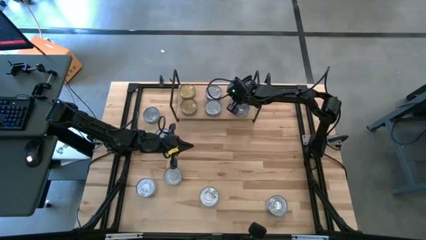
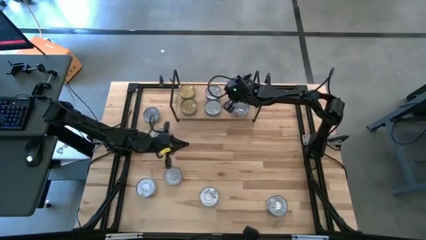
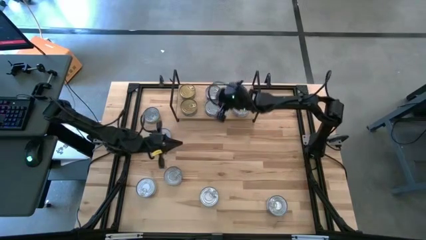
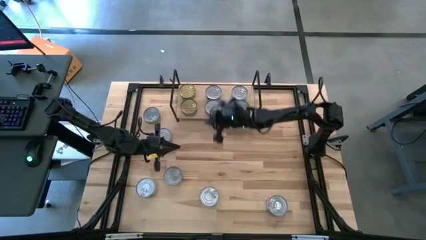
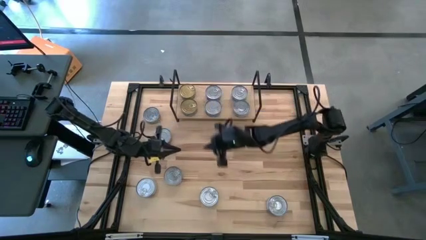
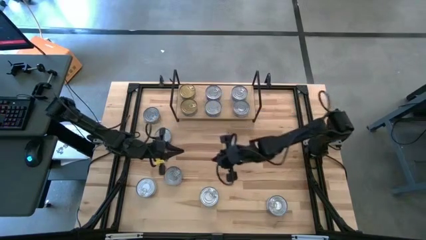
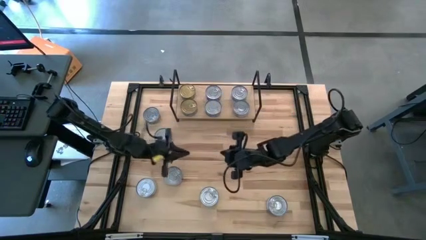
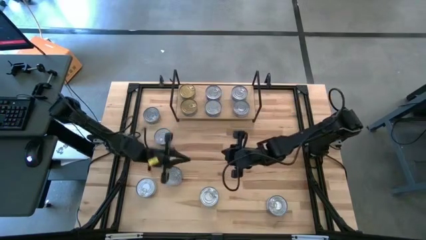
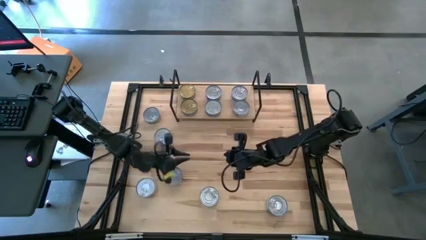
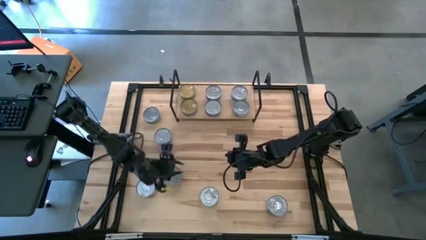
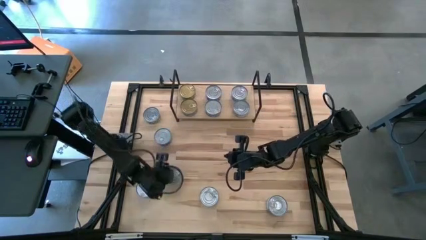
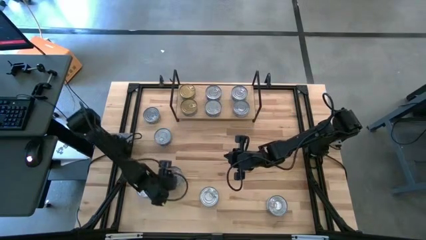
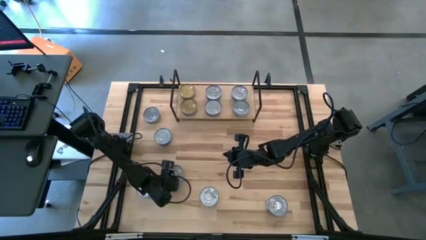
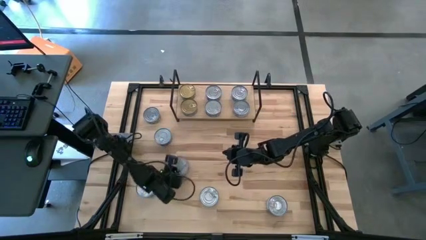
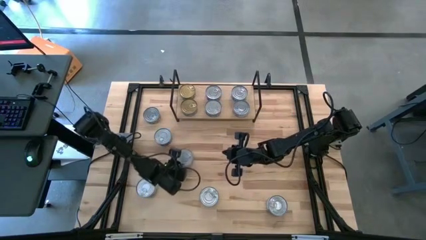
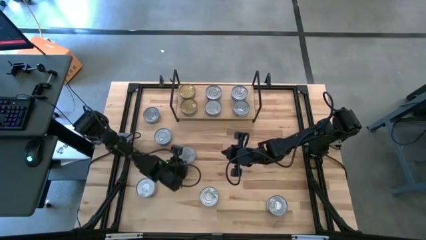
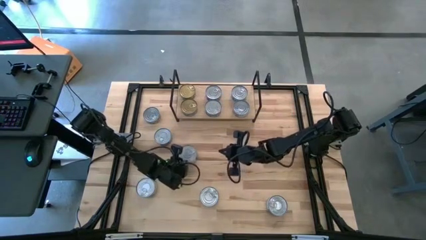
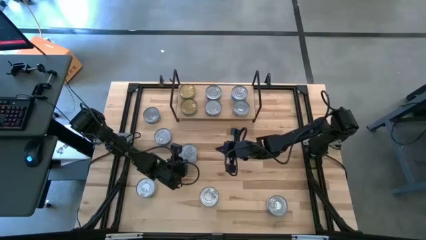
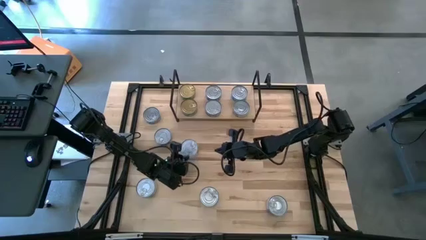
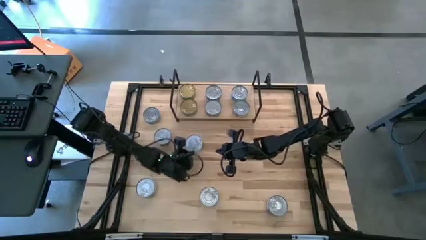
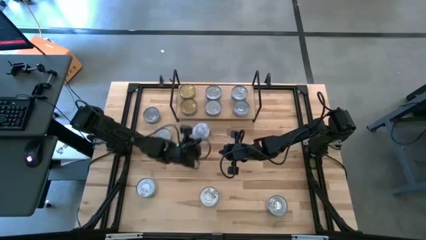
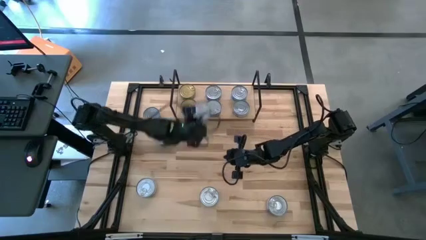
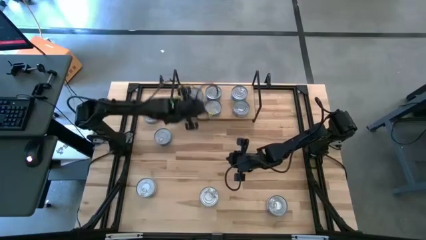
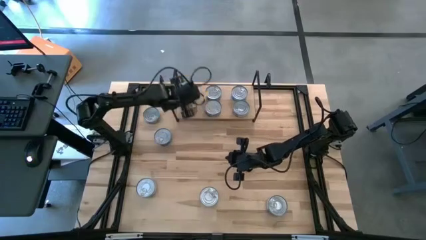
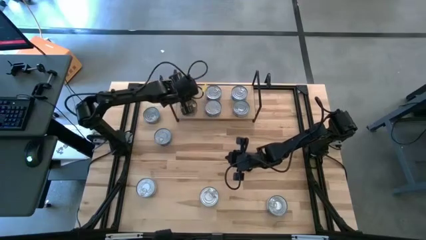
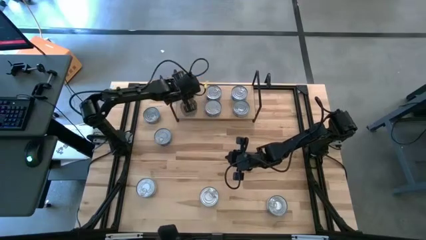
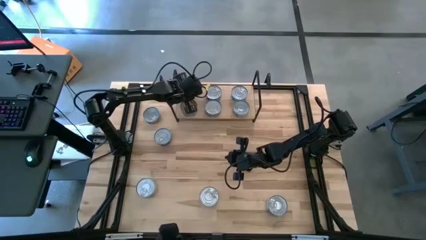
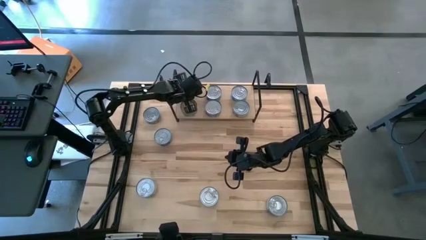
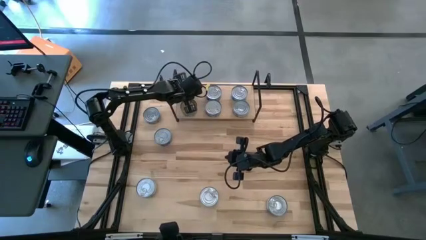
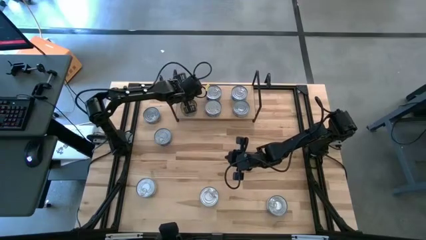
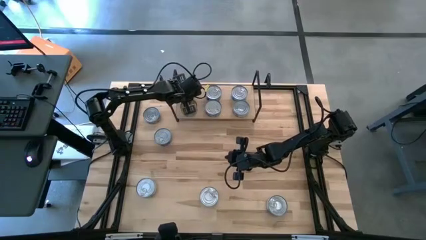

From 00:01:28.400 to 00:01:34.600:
Task: Stack canned seafood by type on shelf
Stack the green tuna can on top of the green tuna can on the shelf

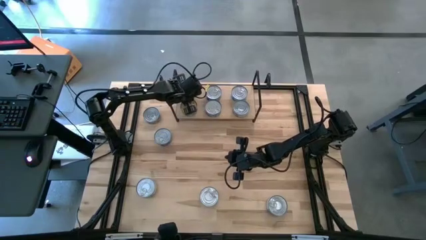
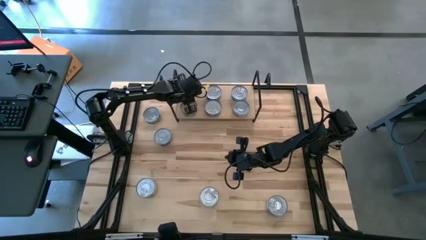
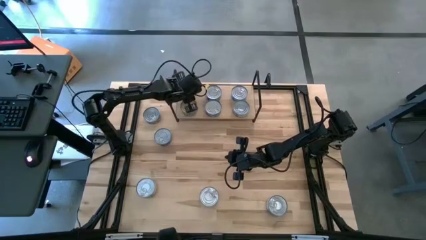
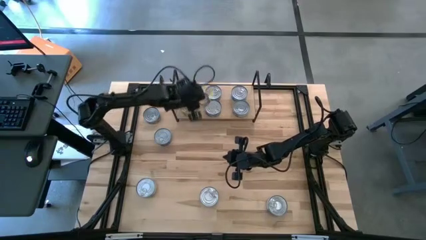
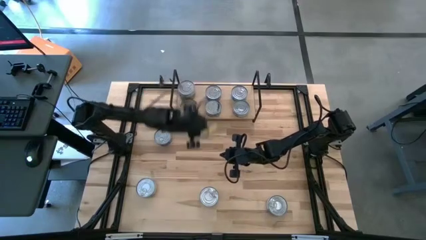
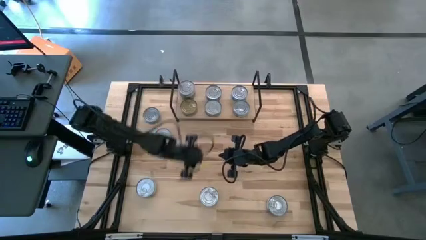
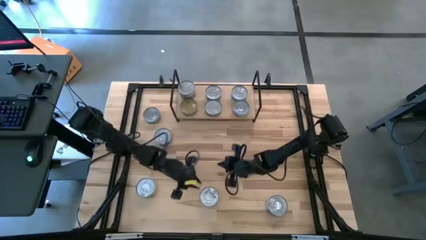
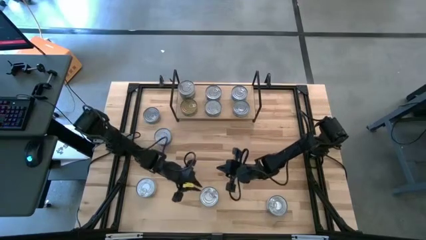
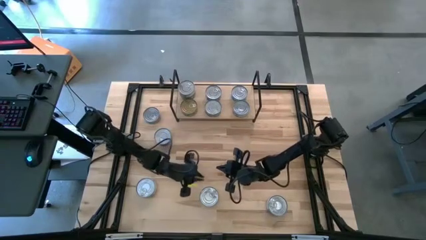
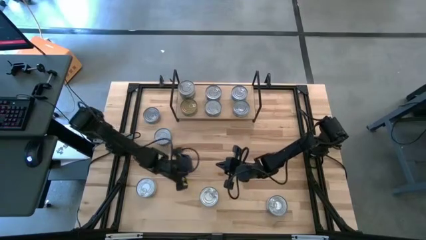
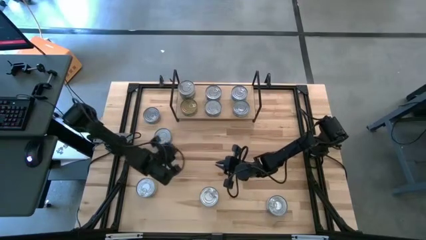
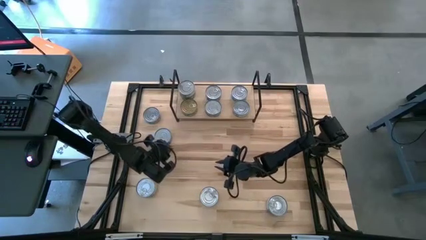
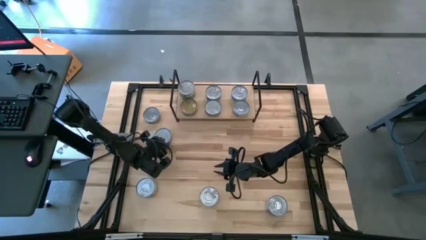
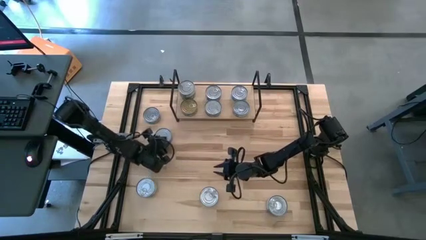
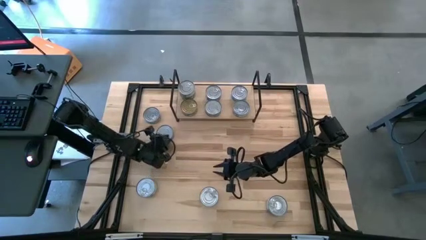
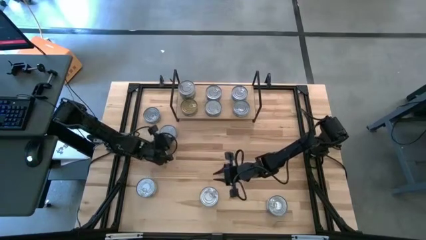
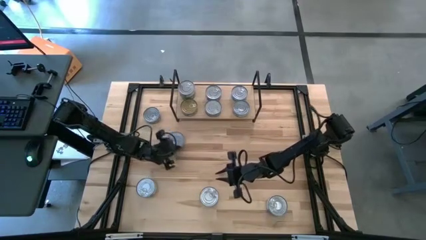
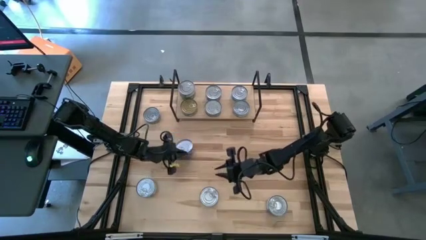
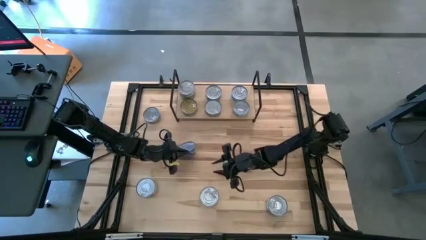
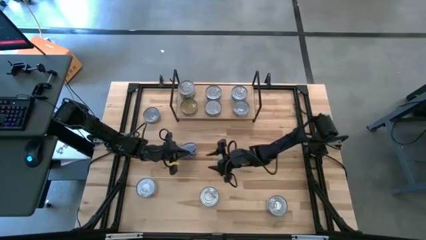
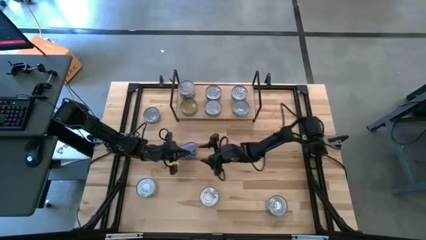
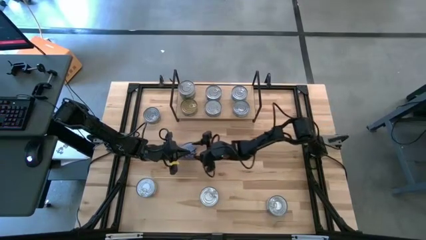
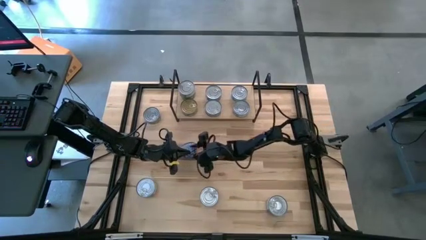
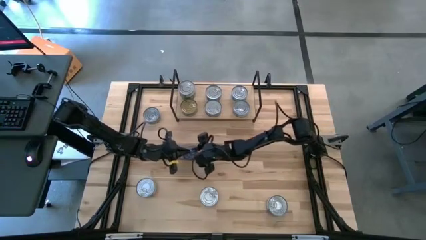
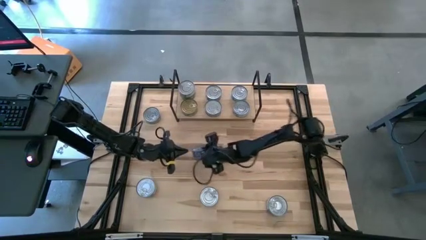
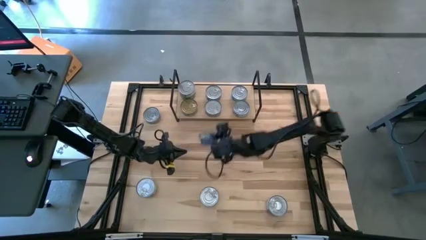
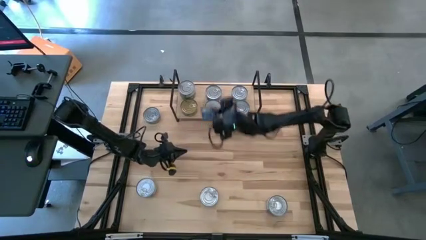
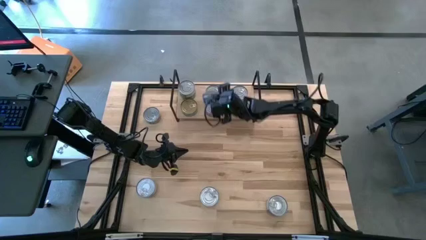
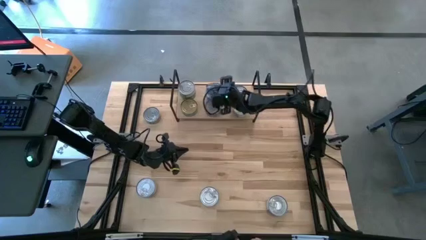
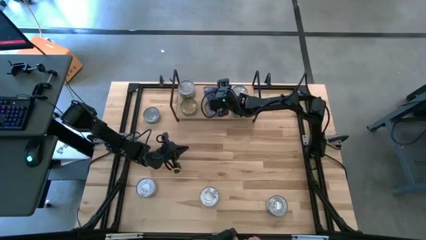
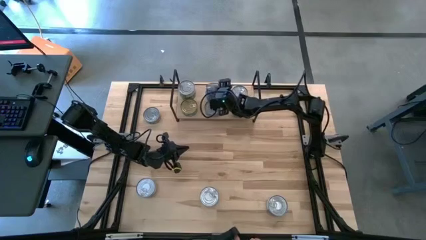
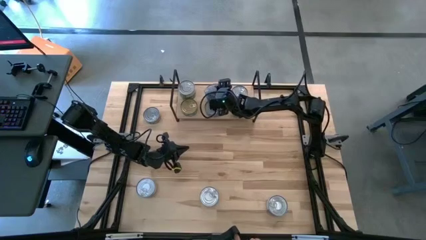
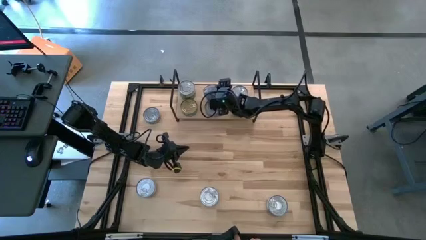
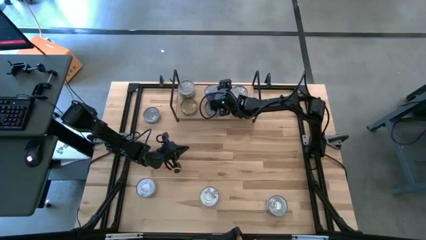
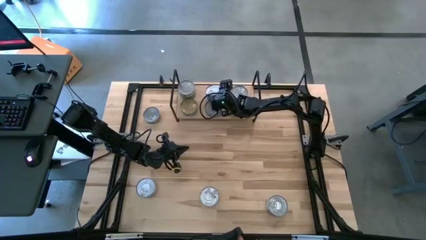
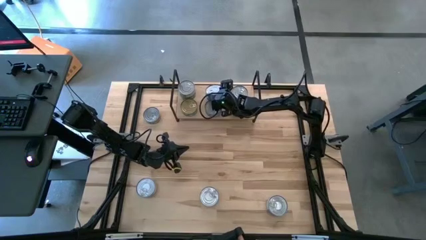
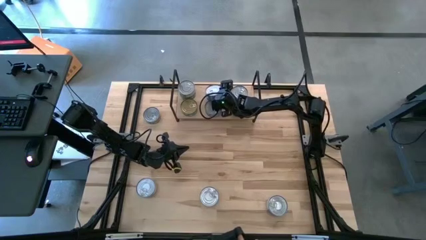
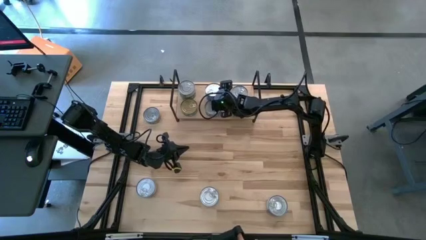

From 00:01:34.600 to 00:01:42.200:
Stack the blue tuna can on top of the blue tuna can on the shelf

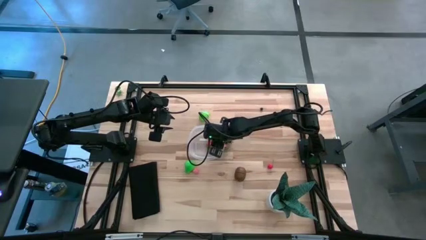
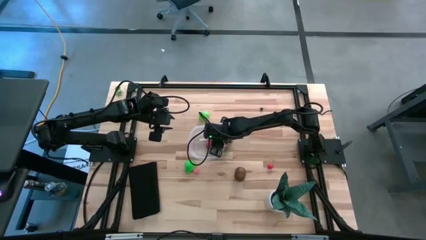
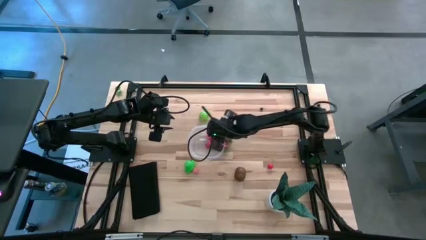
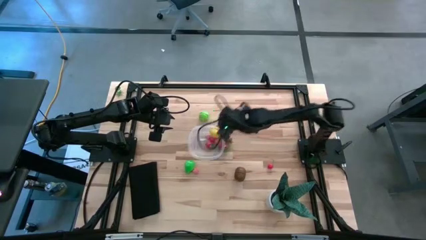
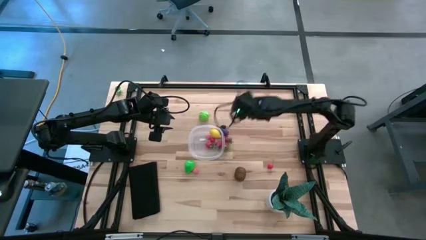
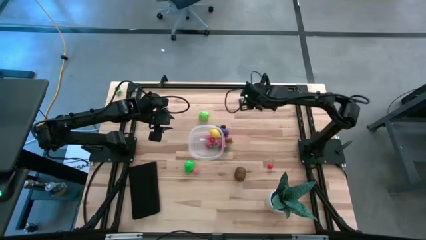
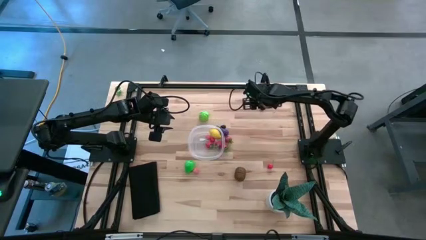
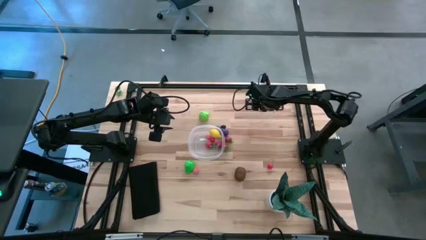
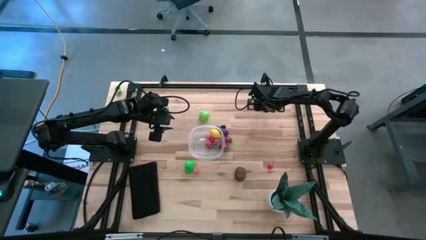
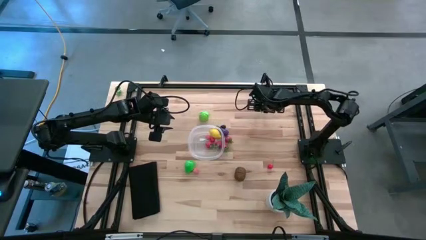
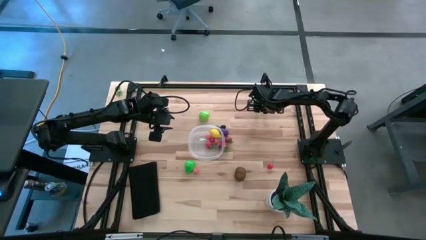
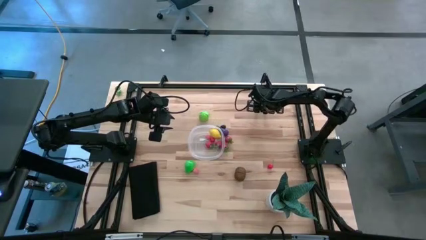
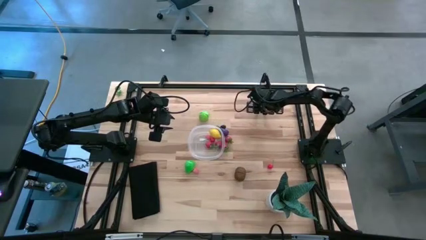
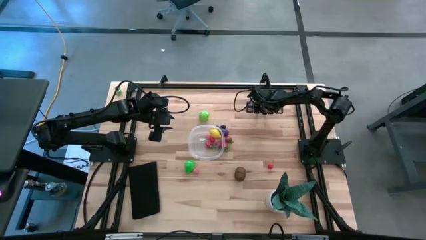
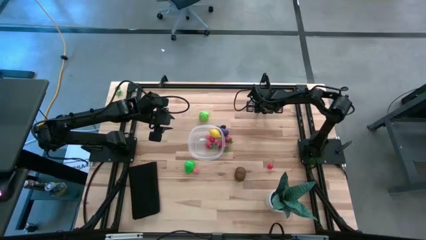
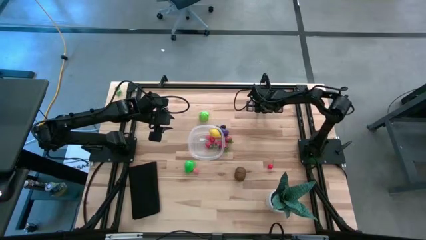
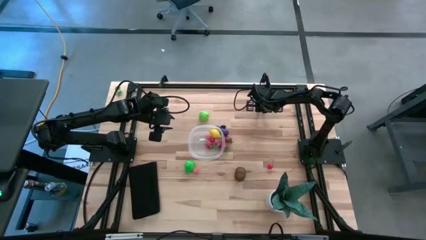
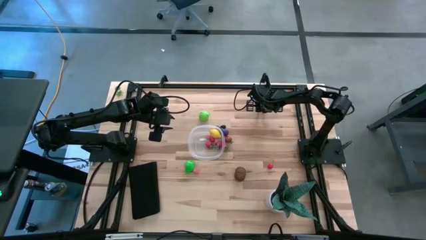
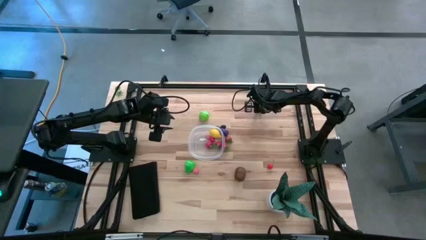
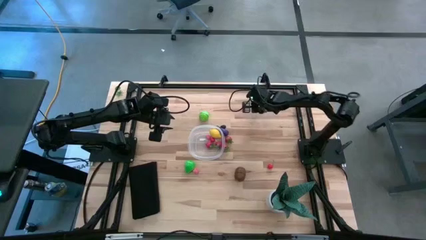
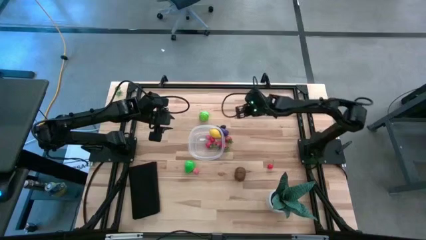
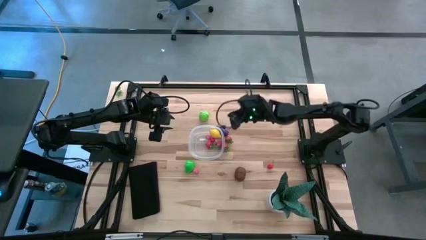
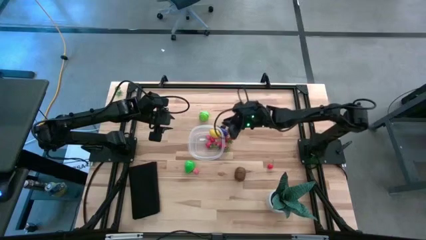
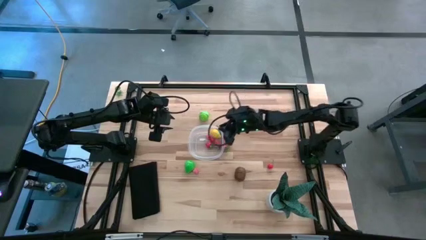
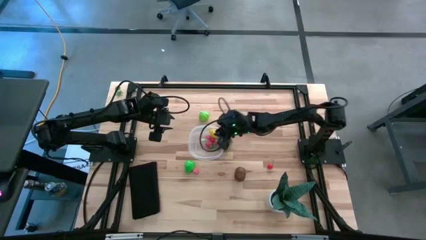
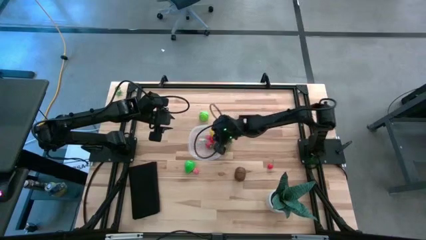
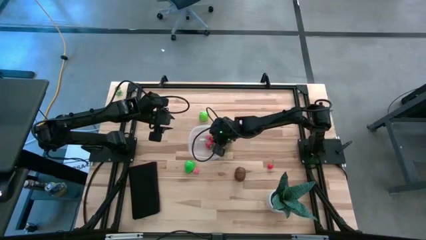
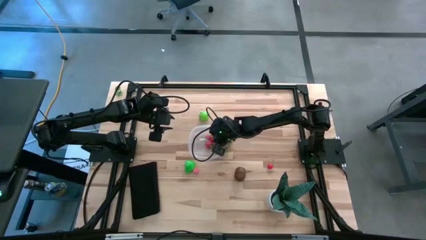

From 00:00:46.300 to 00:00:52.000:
Task: Pick and placing Produce into tupperware
Put the blueberry into the transparent bin
